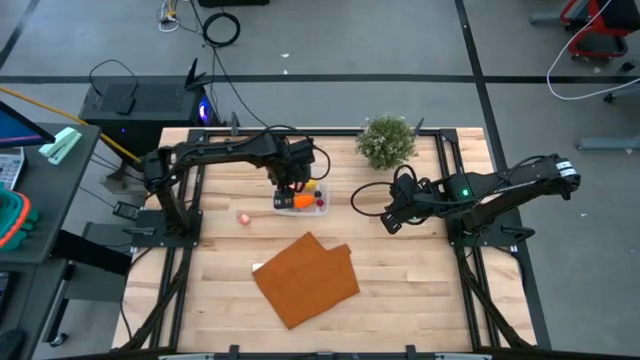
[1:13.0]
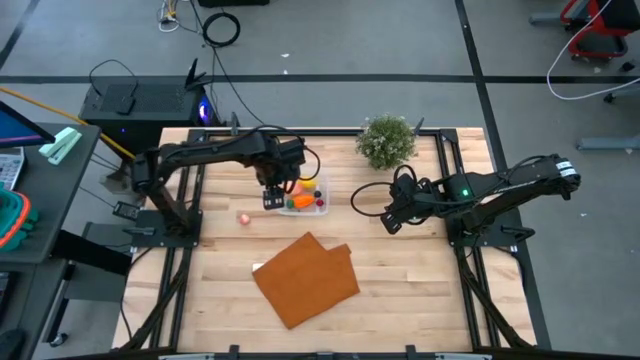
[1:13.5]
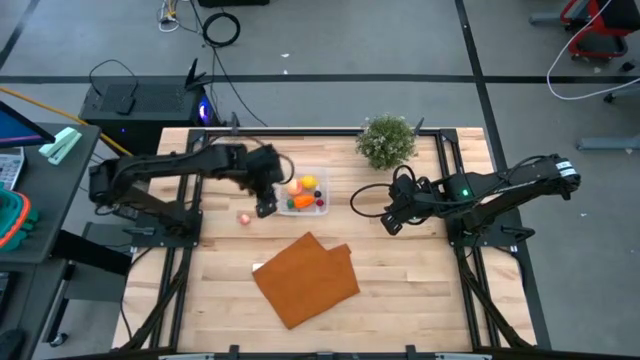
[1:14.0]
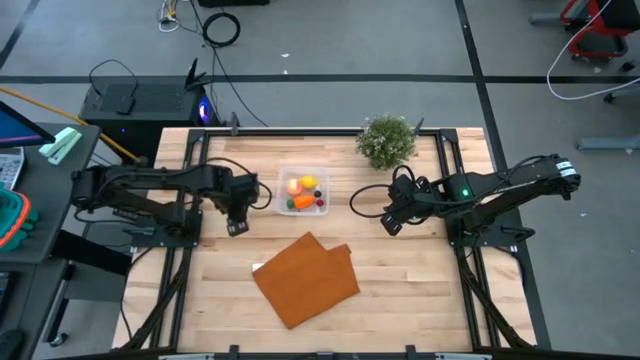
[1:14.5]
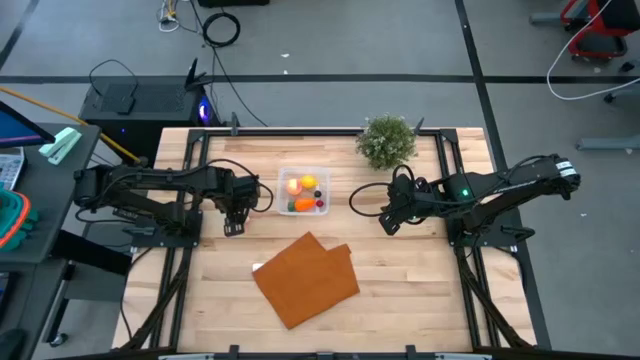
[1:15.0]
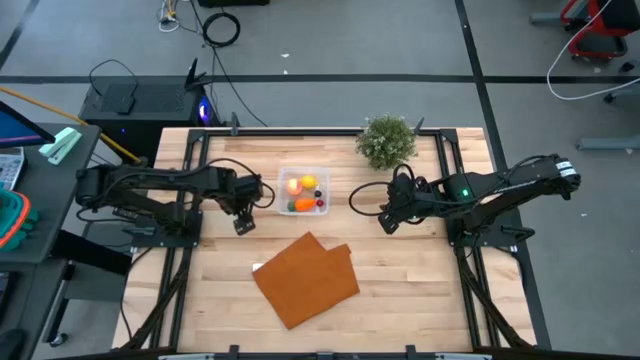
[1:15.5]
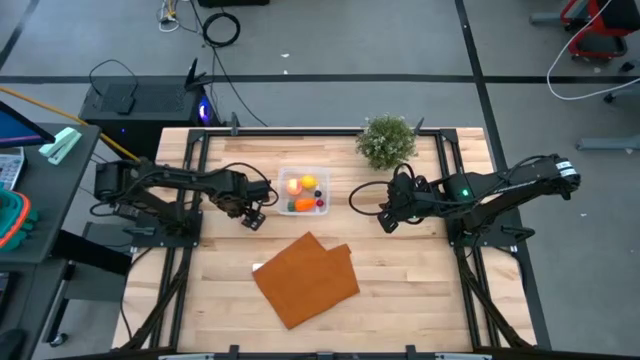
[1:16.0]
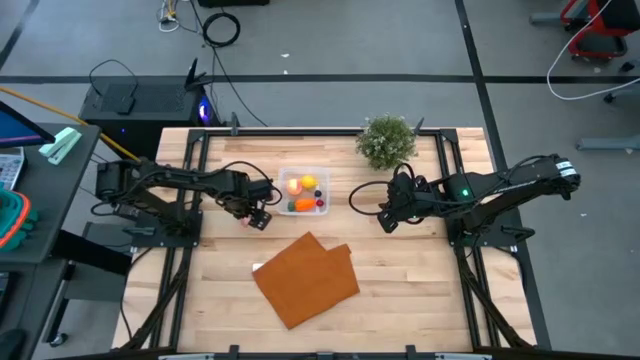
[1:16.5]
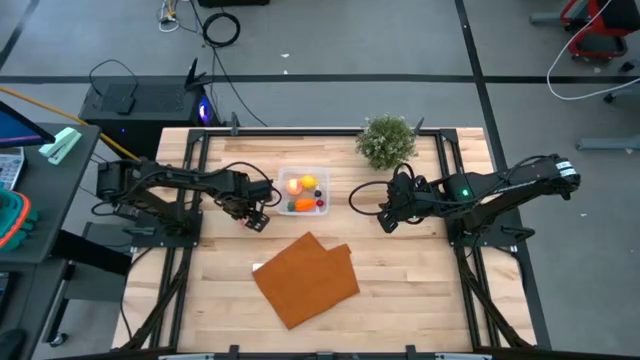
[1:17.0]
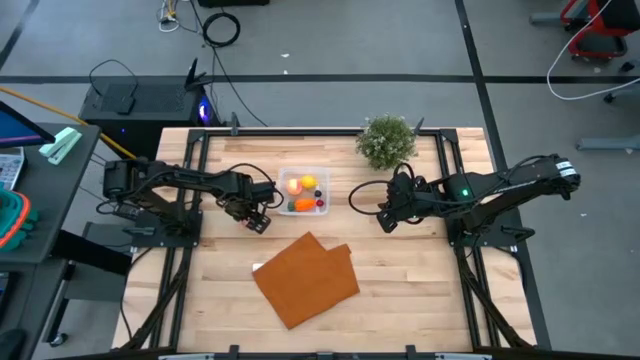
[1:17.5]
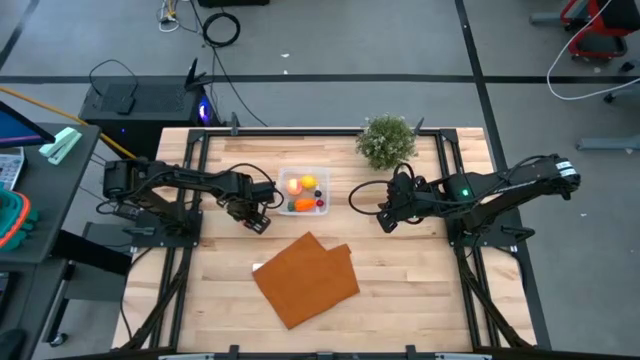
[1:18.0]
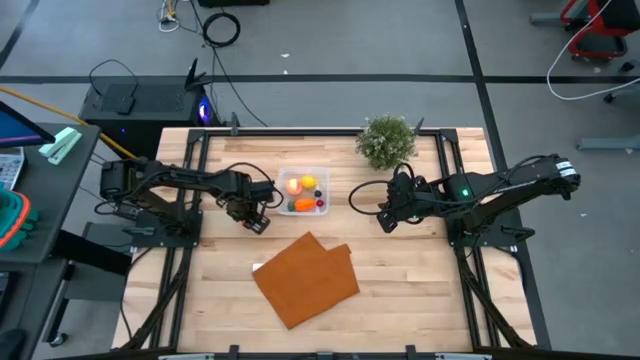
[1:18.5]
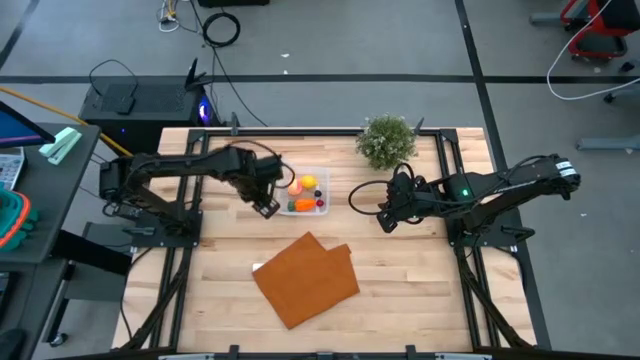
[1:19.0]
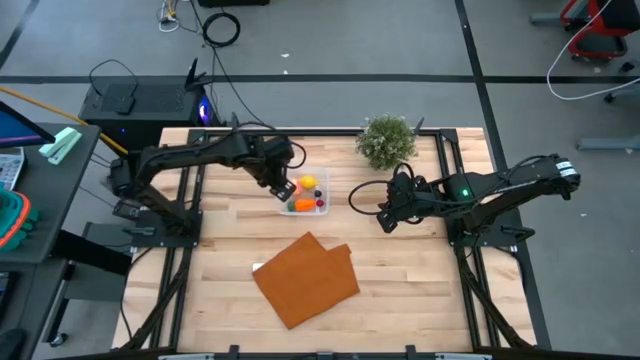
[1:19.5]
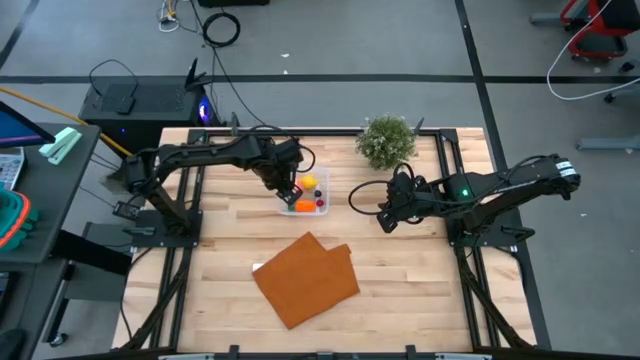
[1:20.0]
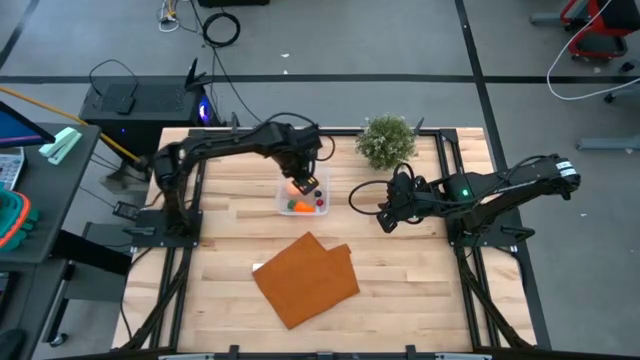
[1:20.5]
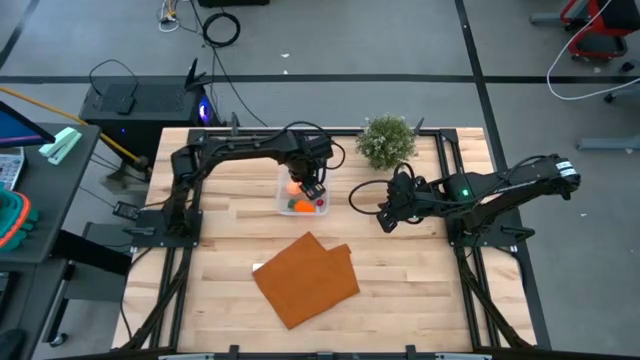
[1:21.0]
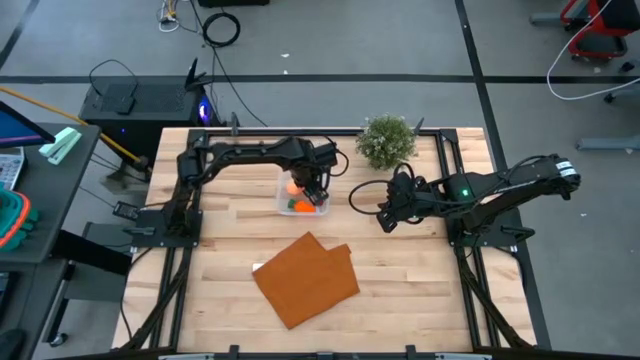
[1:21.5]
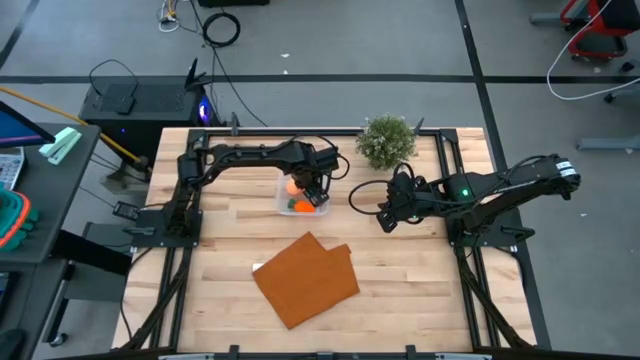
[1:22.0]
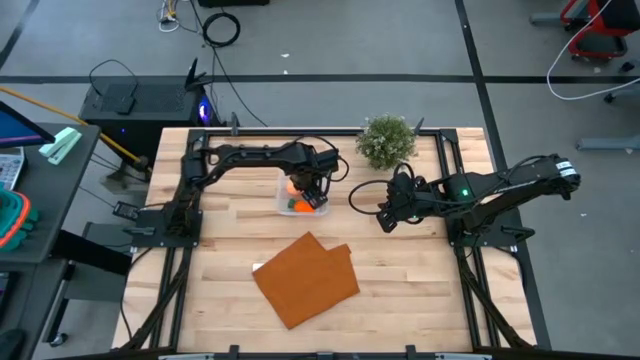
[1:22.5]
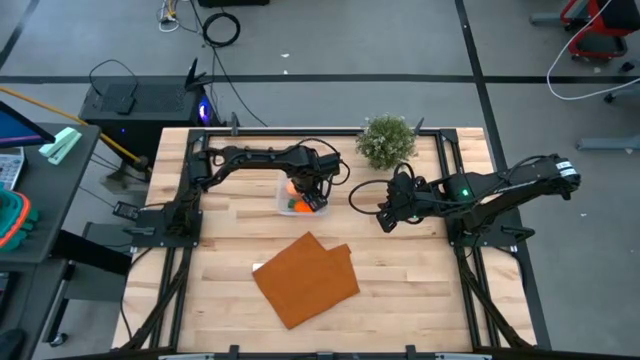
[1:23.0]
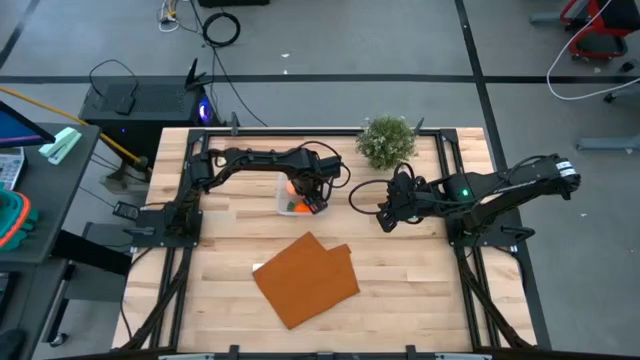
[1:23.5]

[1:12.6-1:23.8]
Task: Pick and placing Produce into tupperware
Put the pink peach into the transparent bin

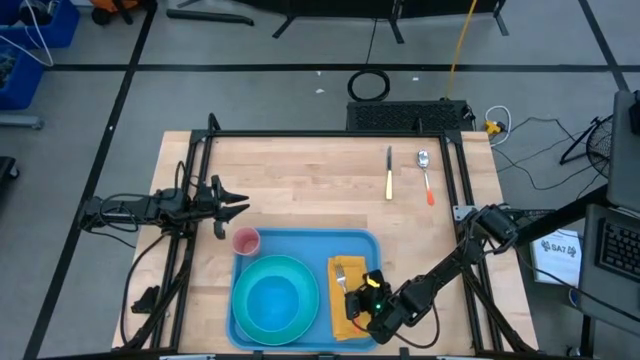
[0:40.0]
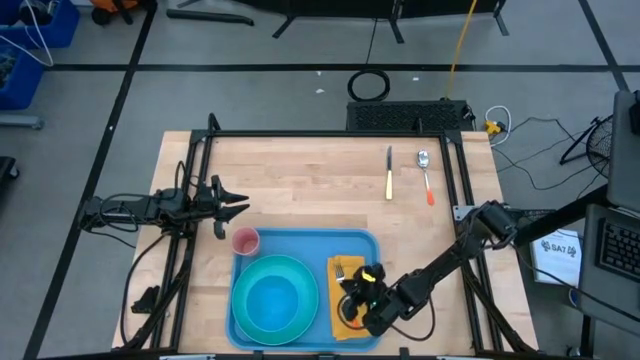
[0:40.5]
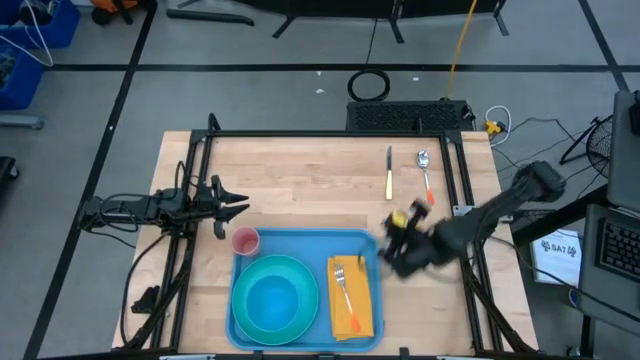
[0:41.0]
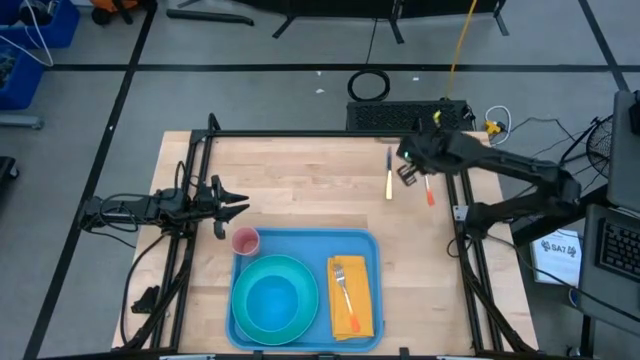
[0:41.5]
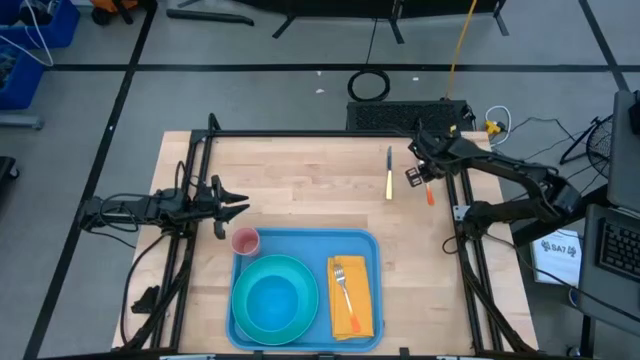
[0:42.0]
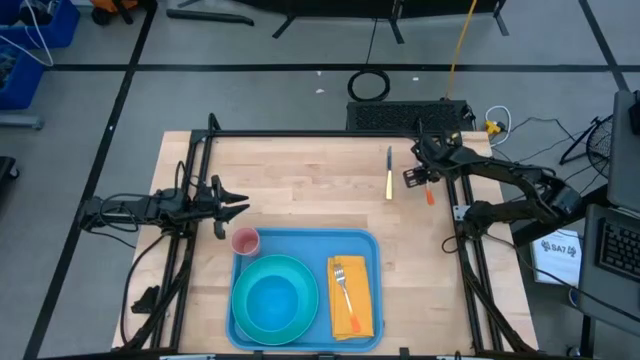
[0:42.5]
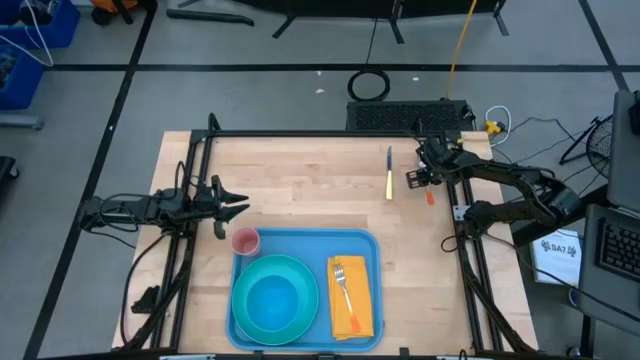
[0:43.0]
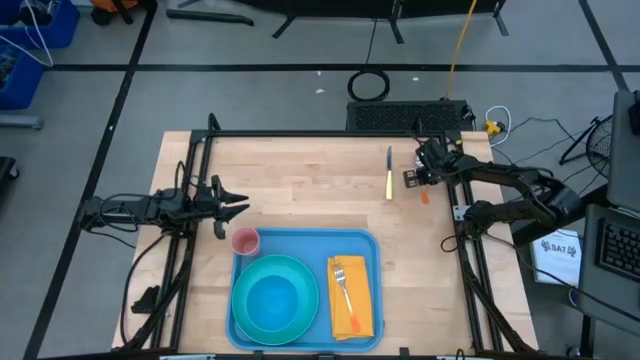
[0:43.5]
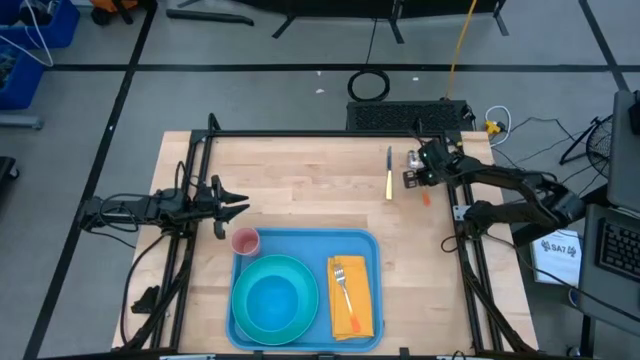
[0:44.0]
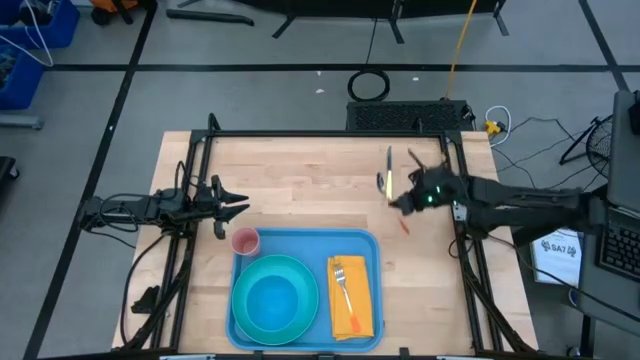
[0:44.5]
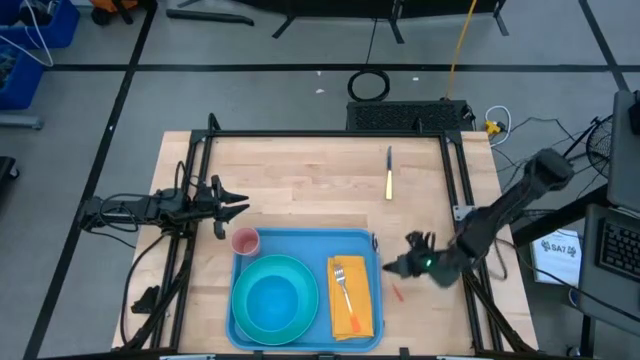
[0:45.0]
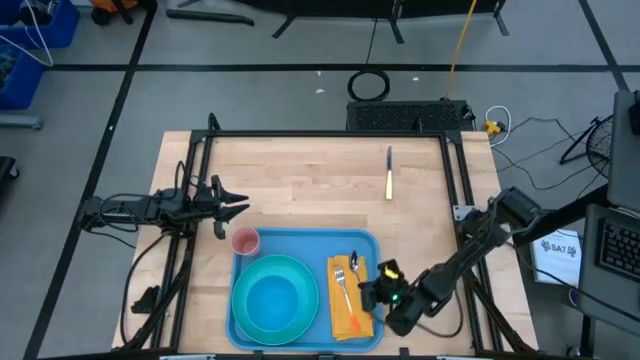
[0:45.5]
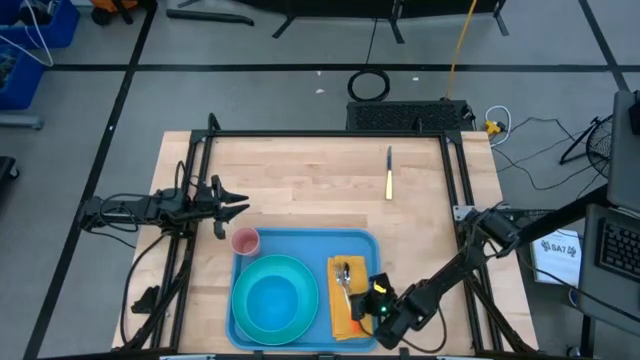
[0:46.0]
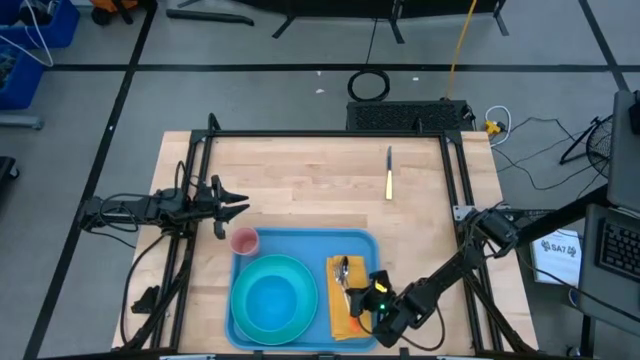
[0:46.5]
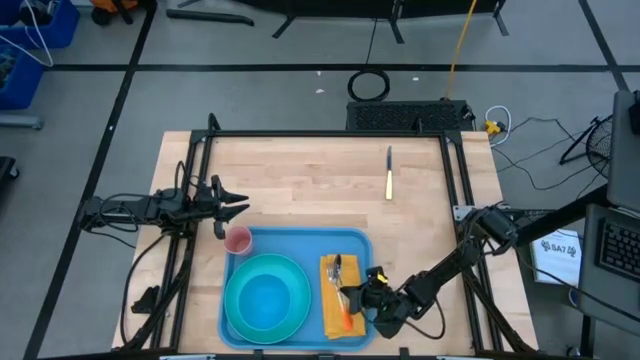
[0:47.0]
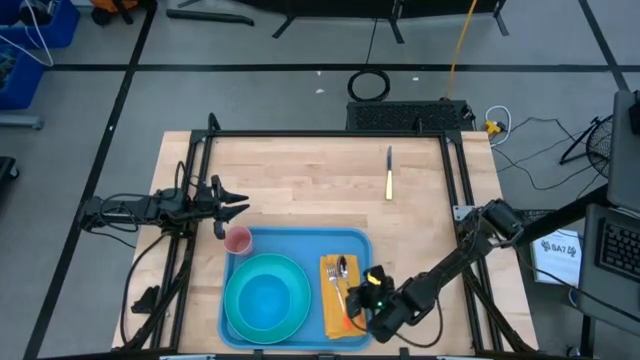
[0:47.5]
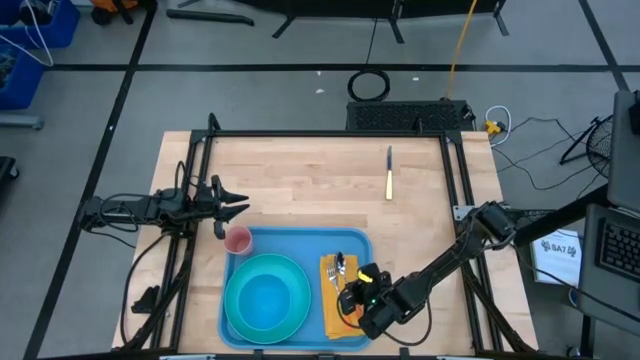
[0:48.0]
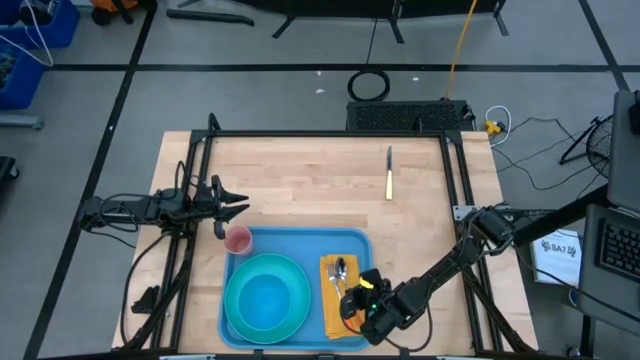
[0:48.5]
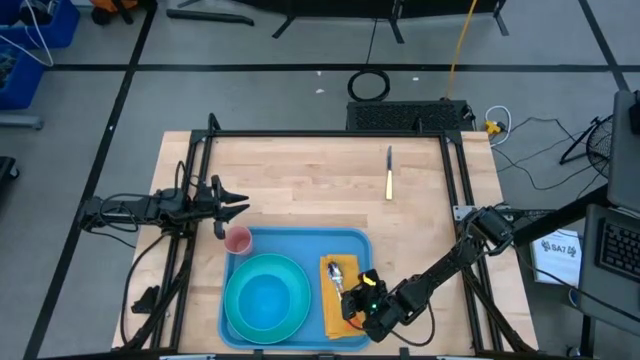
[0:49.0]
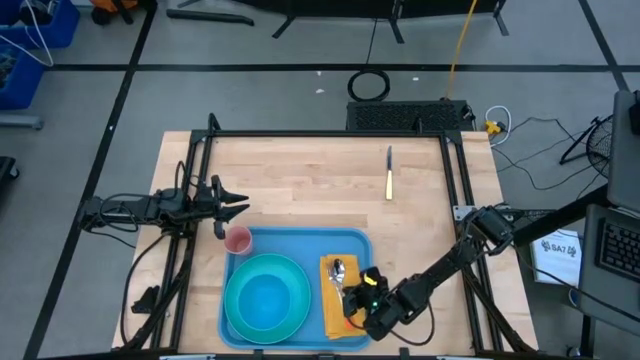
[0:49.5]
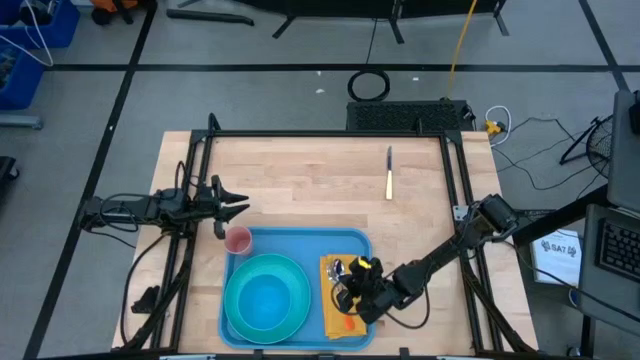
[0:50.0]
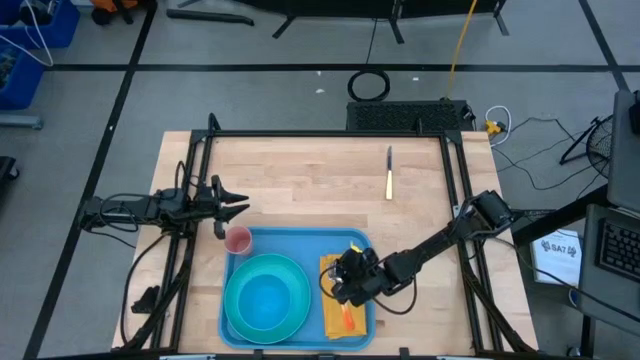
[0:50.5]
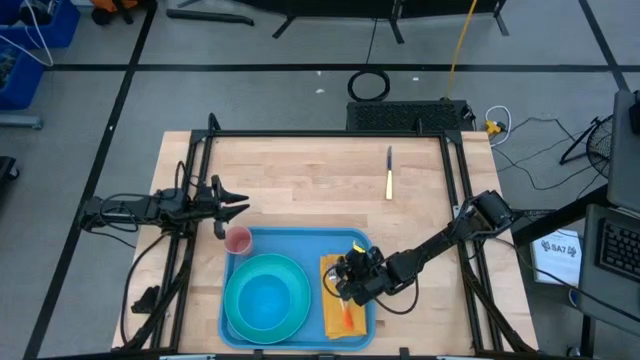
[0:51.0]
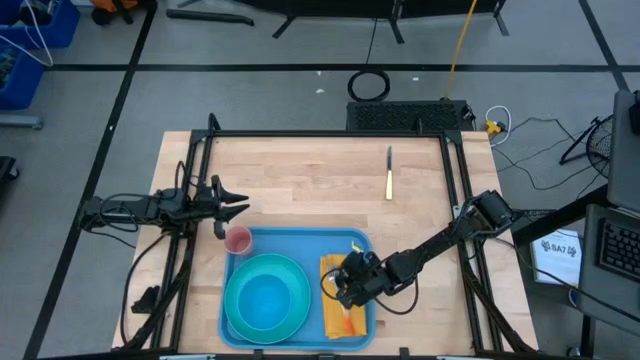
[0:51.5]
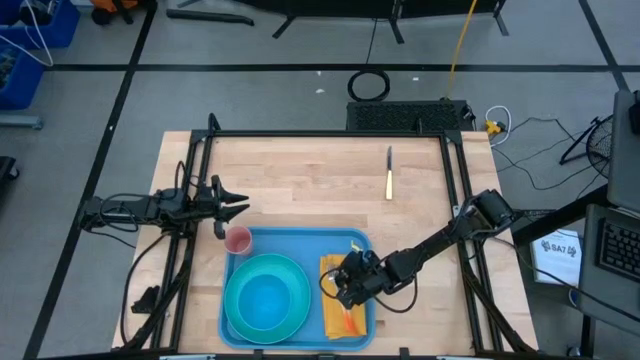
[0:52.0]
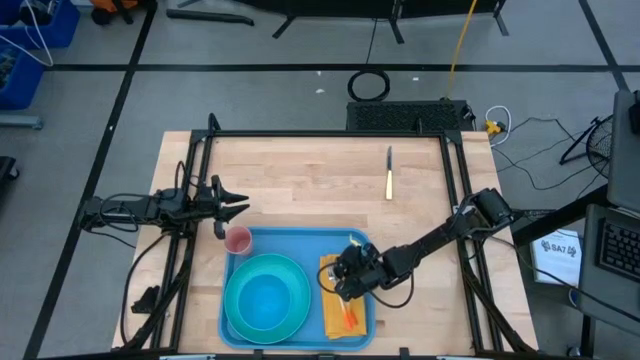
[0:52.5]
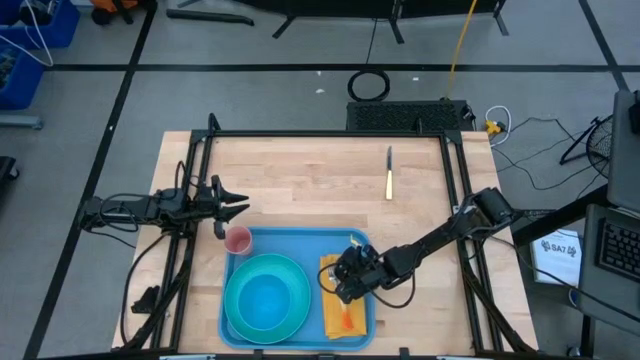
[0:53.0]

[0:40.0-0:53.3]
Task: Set up tray
Put the orange spoon on the yellow napkin to the right of the orange fork
